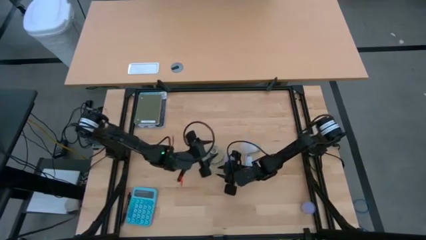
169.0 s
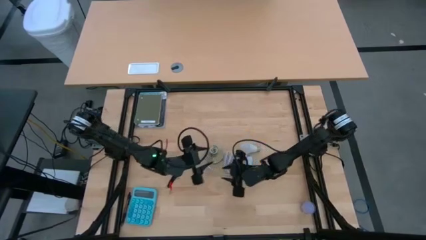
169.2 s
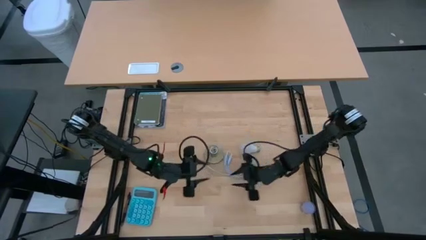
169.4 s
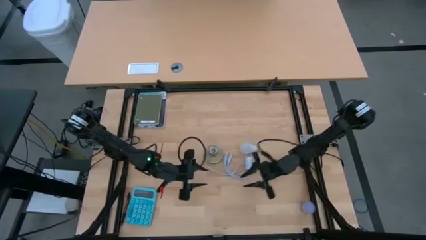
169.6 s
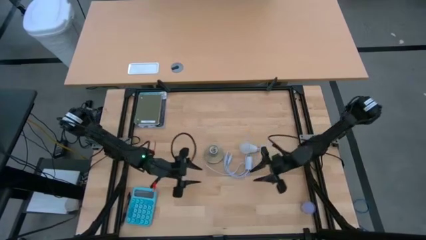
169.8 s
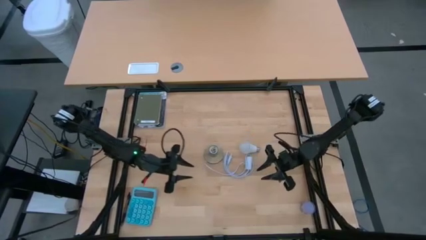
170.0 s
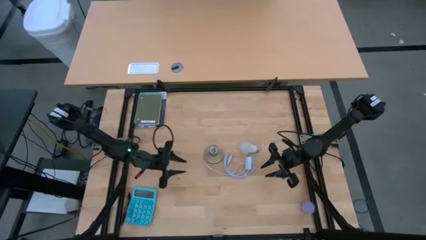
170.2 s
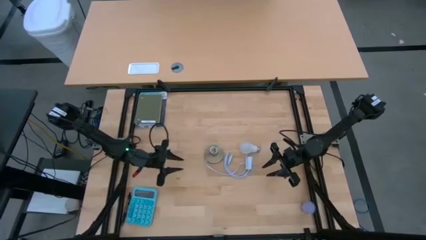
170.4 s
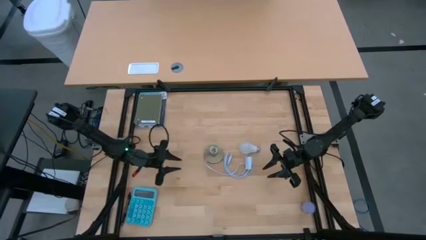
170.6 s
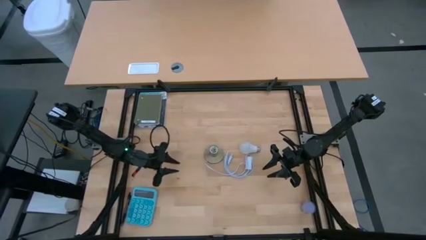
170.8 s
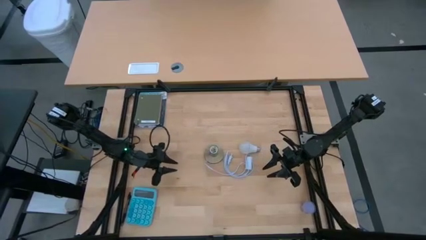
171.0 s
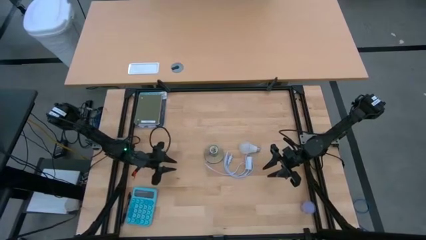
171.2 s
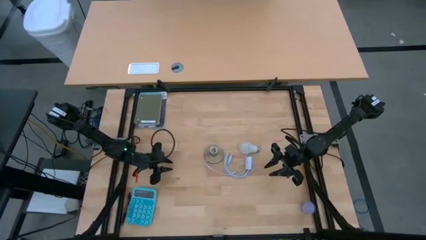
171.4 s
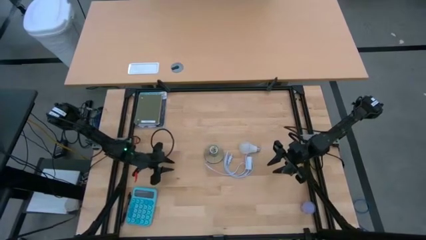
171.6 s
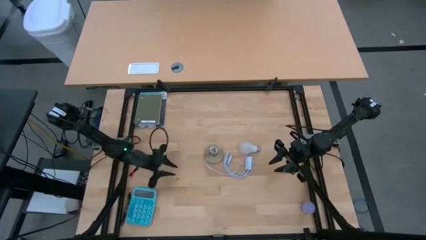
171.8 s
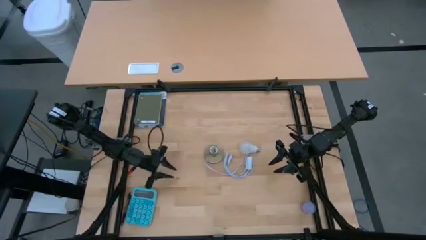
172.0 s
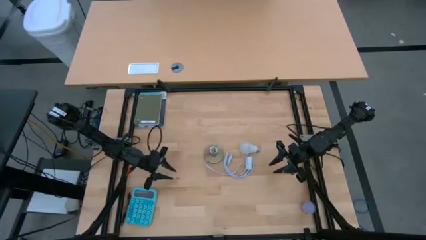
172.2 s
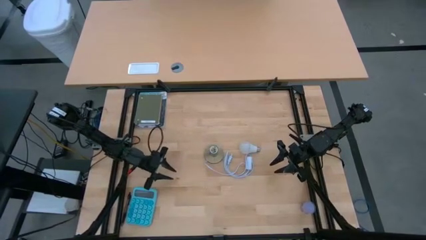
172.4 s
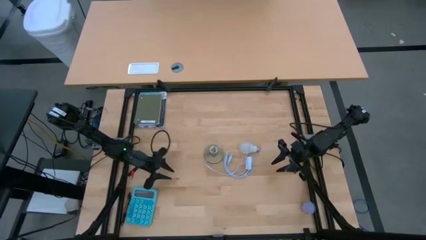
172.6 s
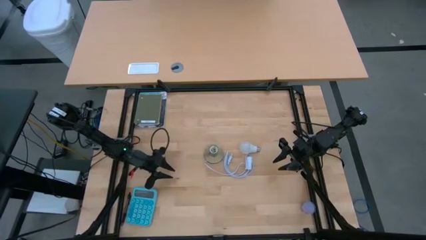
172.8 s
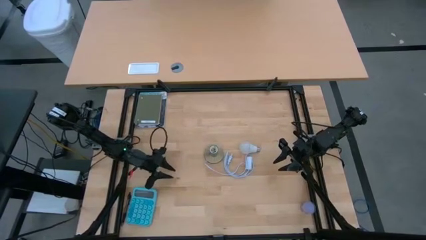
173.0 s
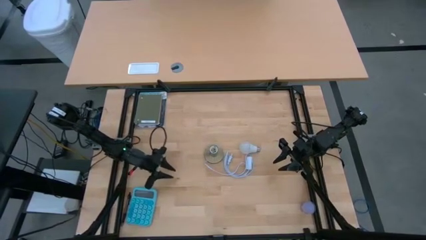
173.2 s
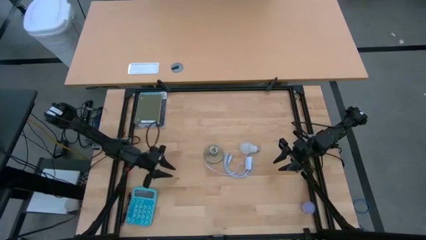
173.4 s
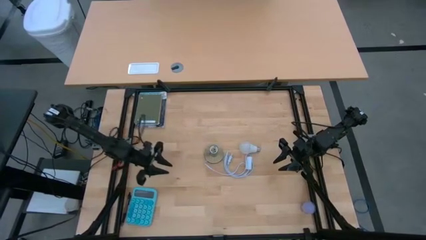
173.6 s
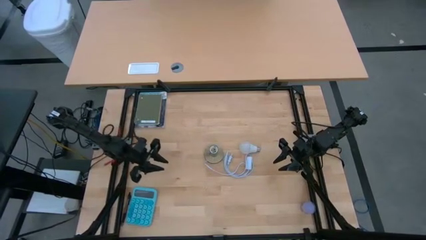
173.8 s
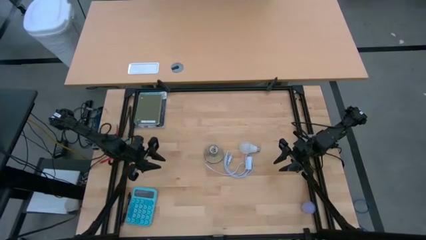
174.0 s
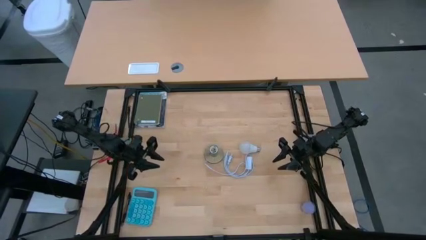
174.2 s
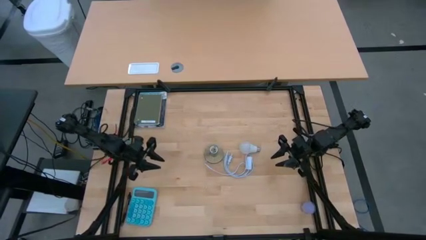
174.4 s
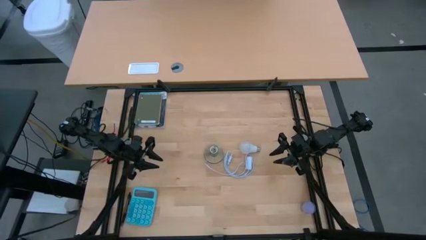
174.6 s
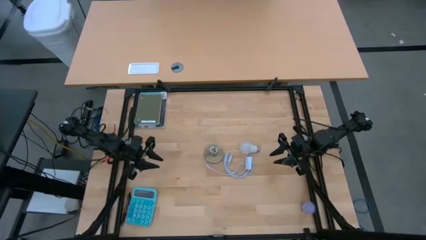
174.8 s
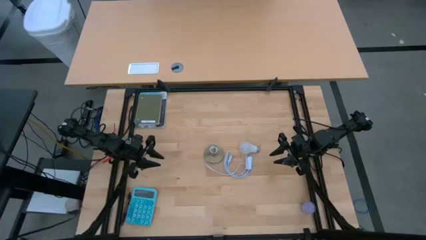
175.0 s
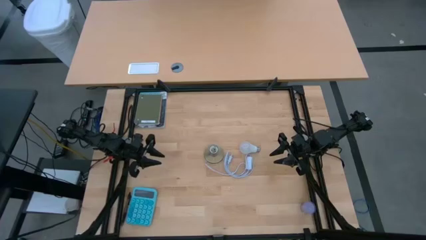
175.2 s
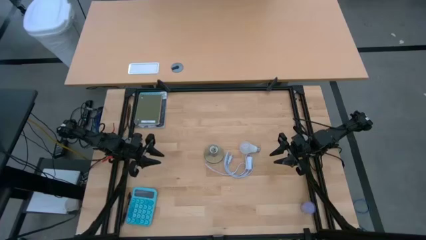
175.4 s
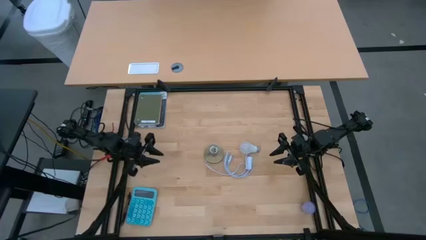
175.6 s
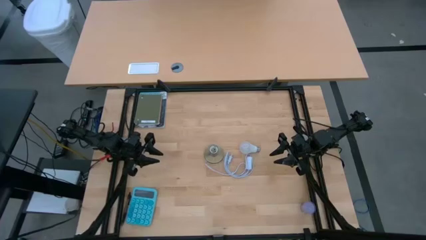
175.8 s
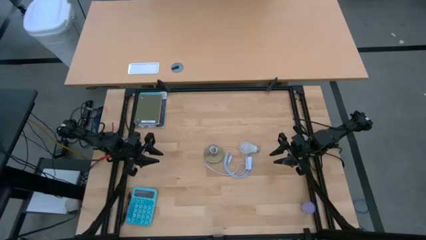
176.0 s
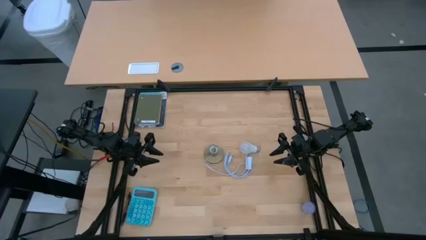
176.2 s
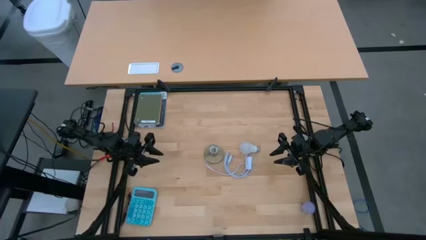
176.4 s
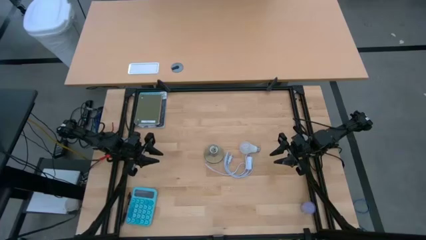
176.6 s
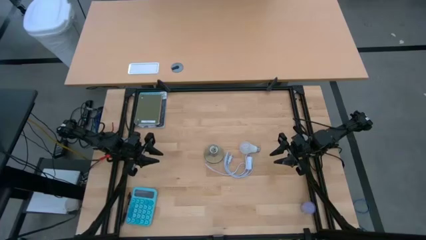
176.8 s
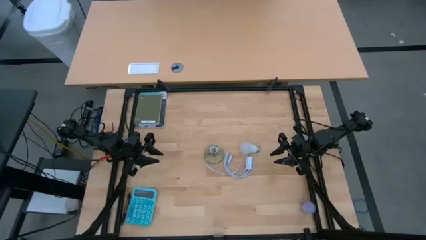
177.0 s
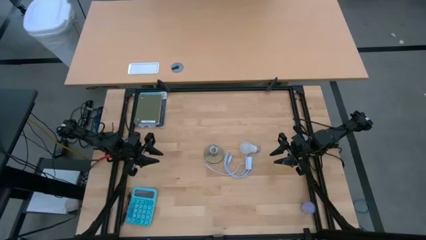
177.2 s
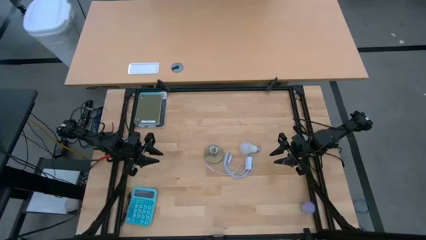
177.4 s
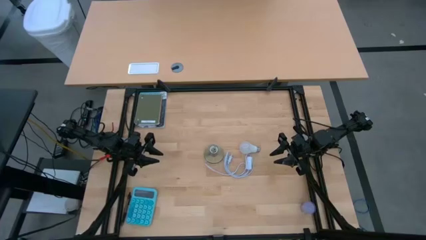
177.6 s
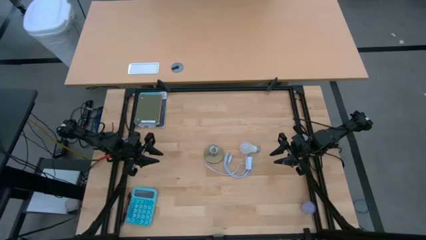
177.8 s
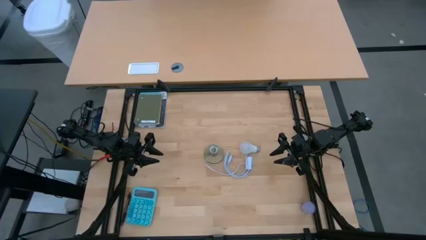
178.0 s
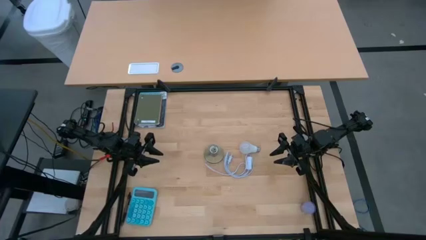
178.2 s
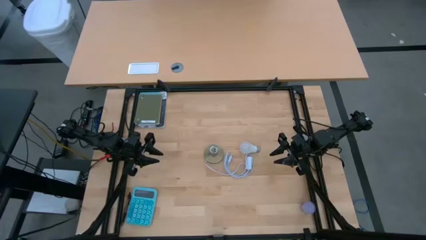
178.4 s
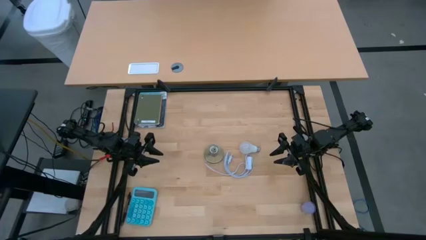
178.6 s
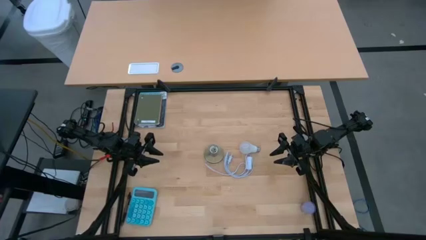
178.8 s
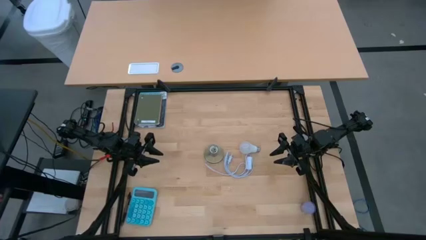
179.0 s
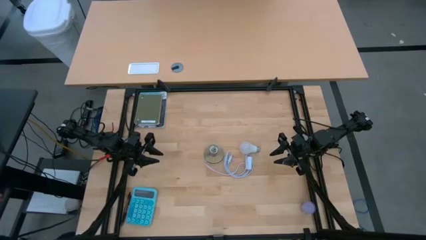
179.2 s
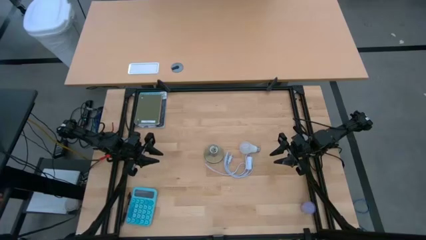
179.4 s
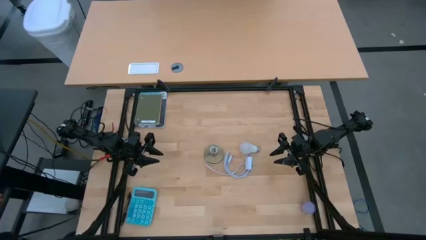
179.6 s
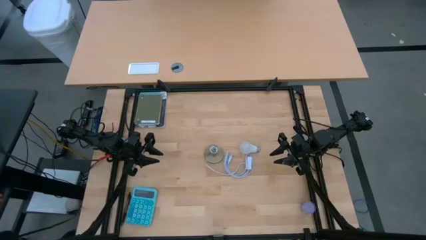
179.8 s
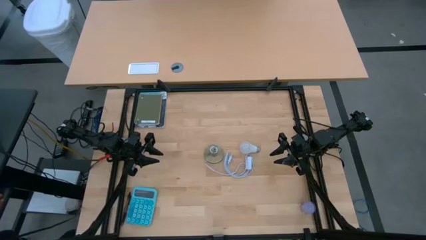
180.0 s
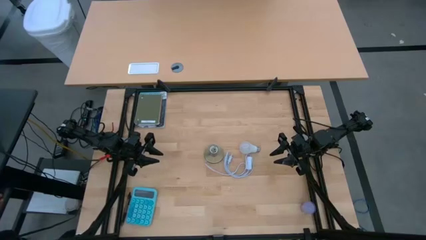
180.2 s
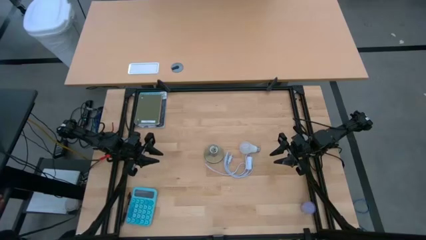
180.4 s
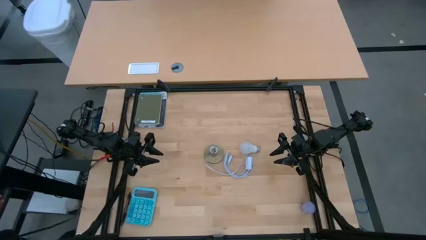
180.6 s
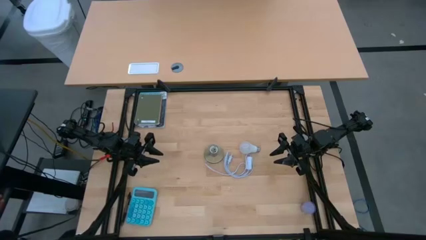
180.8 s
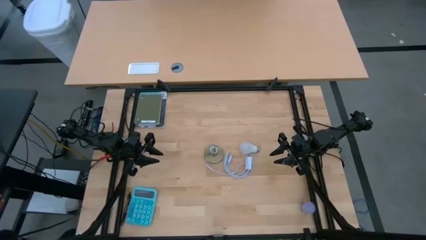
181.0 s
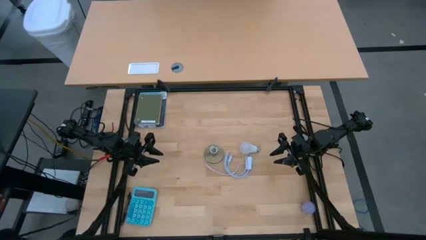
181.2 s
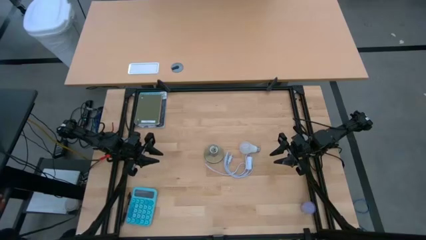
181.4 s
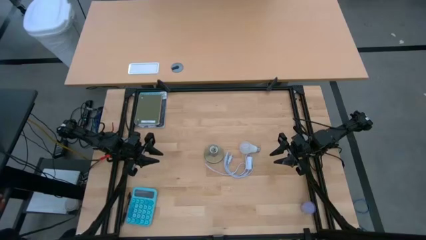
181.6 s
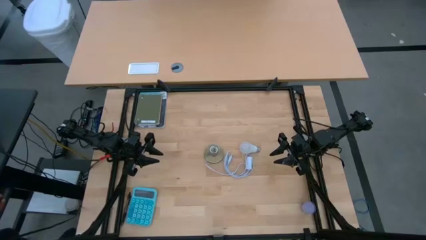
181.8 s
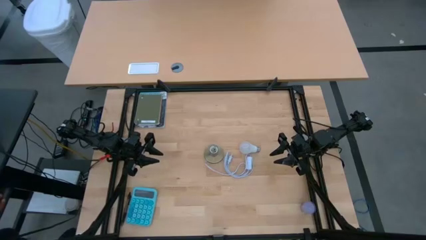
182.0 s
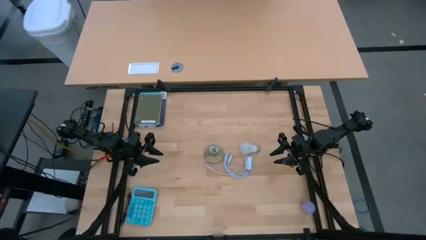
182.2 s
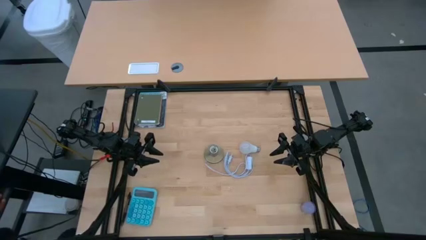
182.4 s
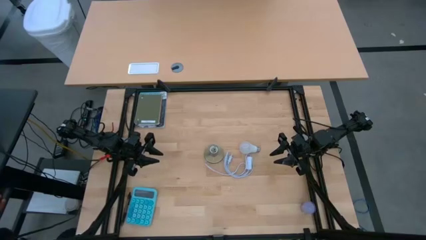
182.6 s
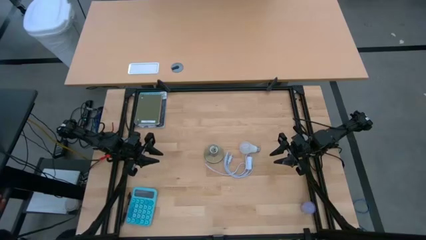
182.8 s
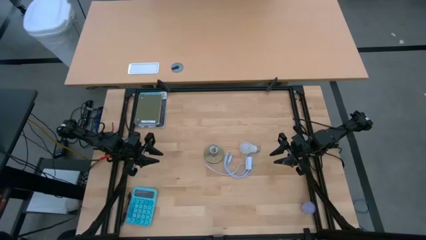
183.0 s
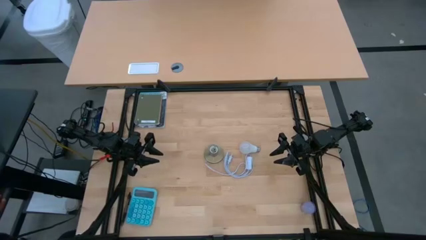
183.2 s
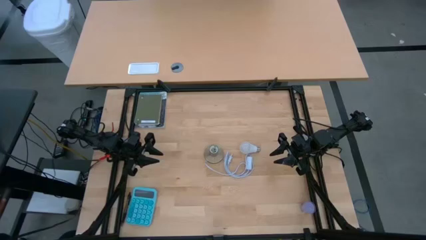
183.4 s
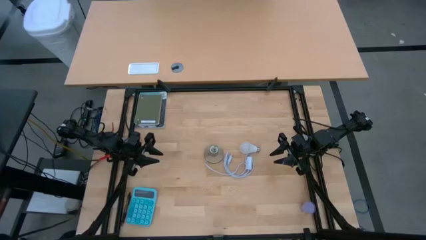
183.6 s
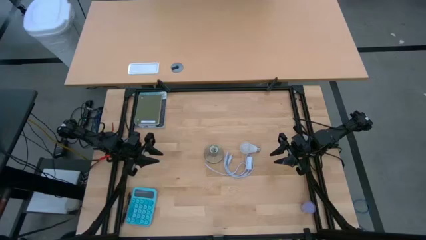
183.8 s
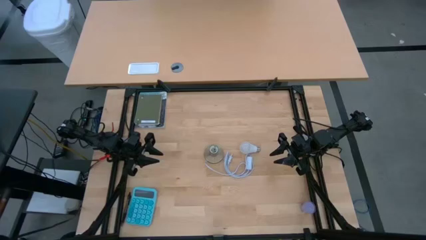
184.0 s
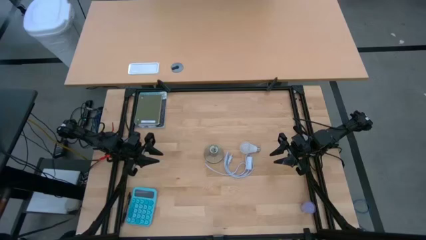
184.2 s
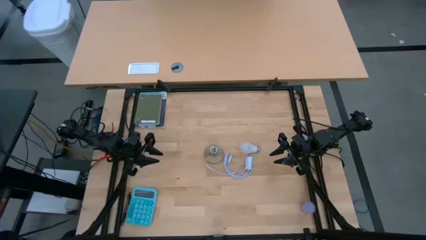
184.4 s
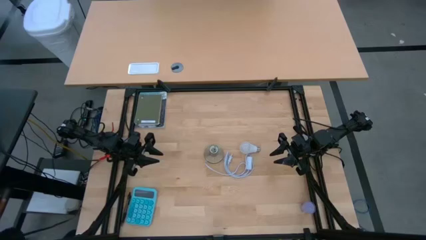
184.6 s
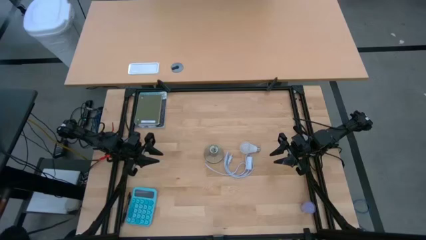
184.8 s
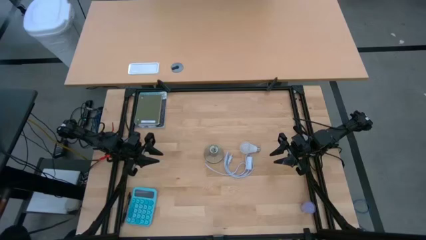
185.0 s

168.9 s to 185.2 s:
Task: Screw lightbulb
Return to Home Position
